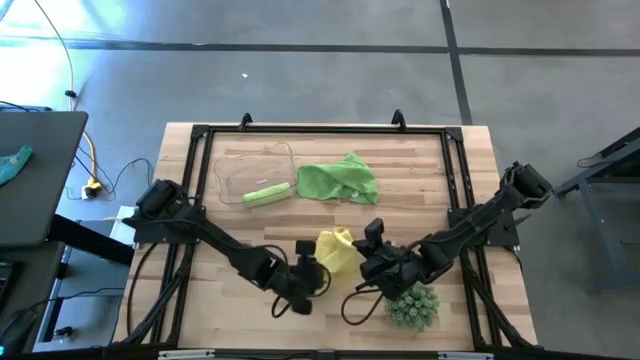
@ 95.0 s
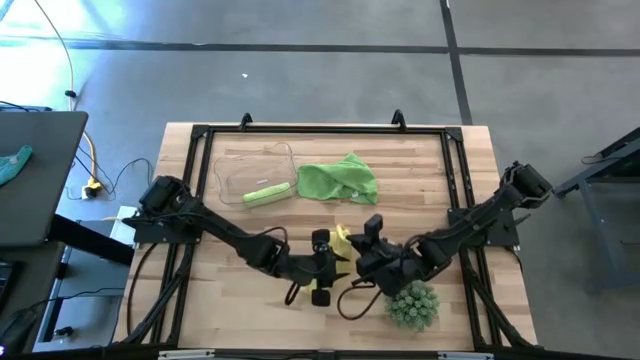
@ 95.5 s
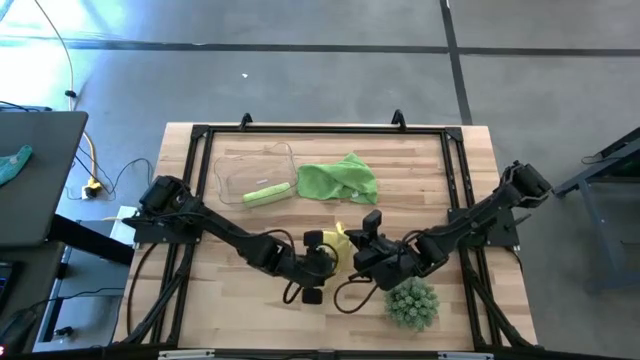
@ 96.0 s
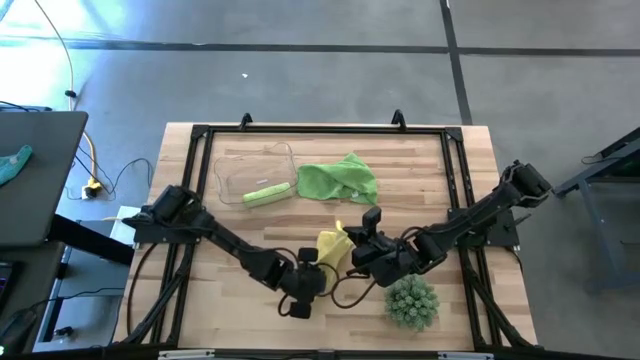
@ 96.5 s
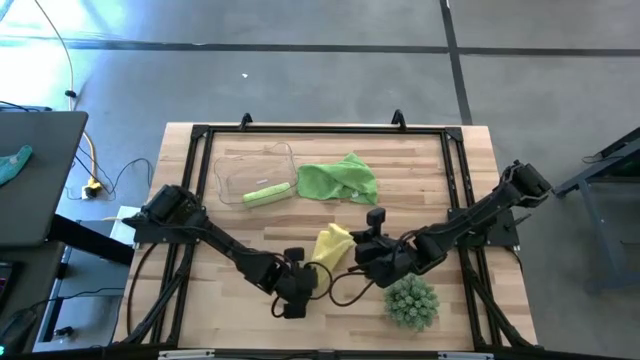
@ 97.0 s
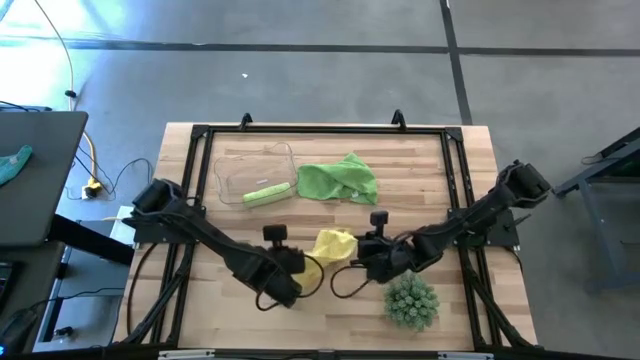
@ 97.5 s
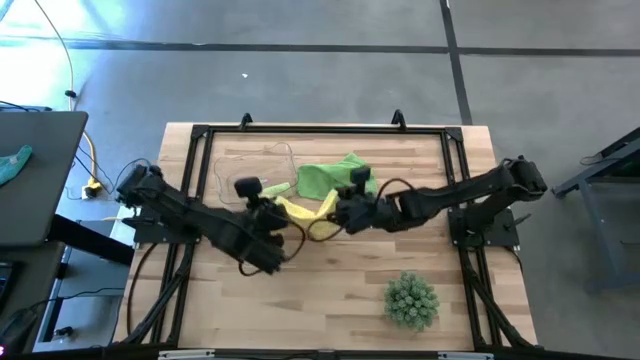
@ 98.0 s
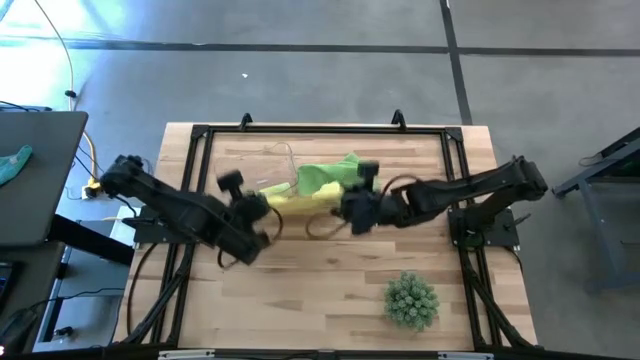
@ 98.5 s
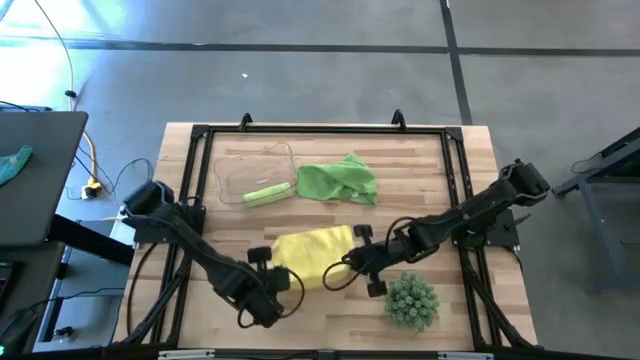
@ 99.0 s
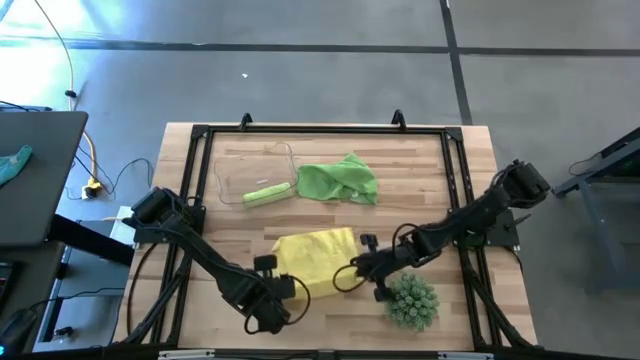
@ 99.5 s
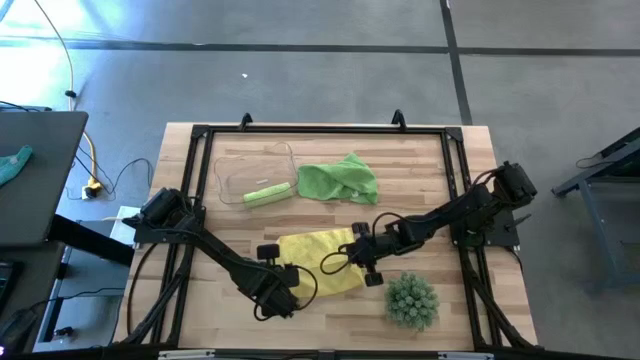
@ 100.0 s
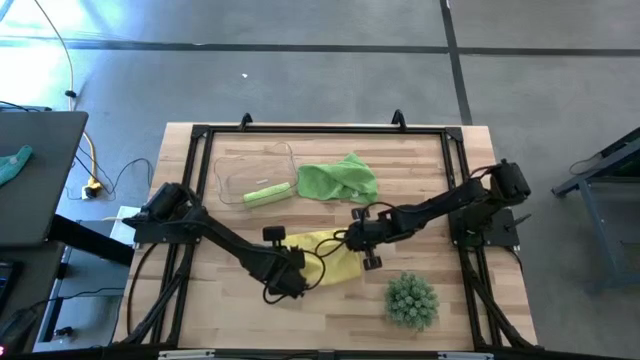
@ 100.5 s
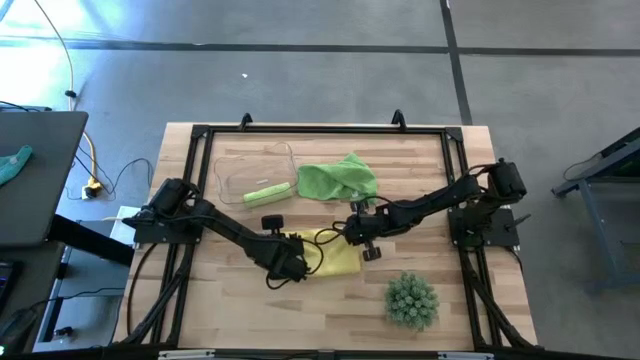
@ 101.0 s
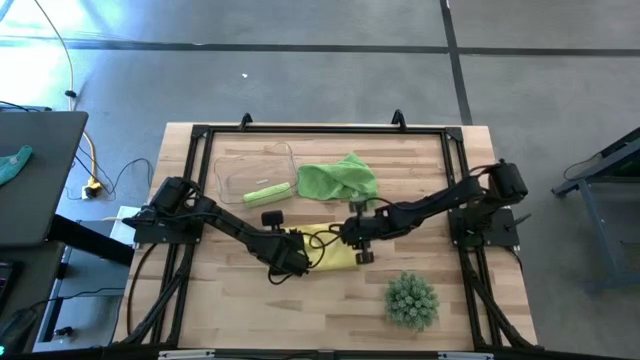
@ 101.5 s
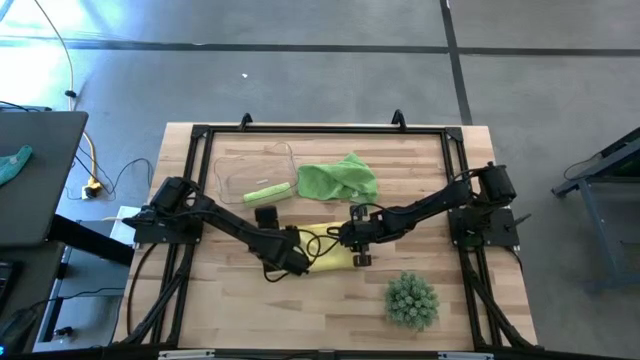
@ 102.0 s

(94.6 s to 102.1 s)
Task: Roll microfiber towels into tight, uniform cylinder then place into a basket
Fold the yellow towel

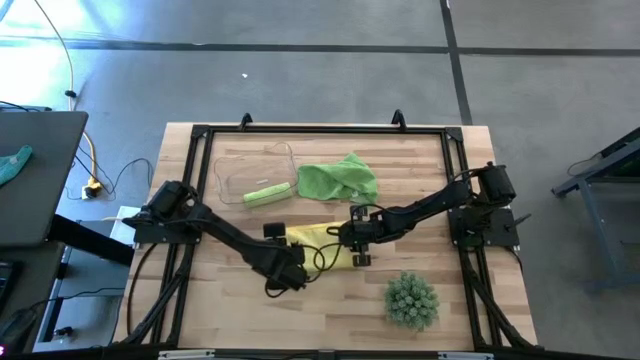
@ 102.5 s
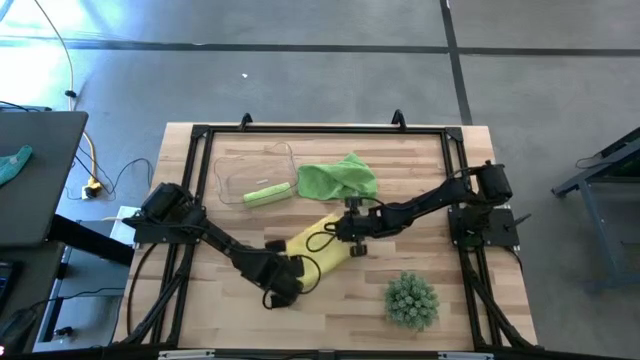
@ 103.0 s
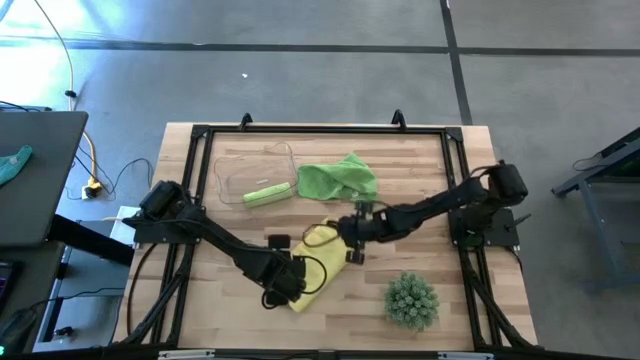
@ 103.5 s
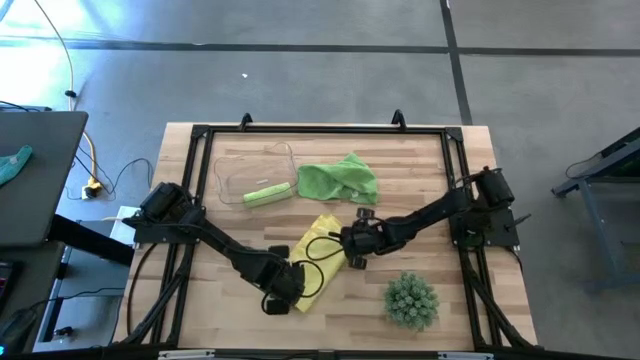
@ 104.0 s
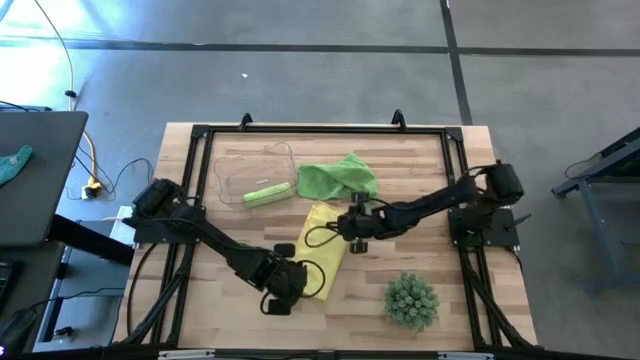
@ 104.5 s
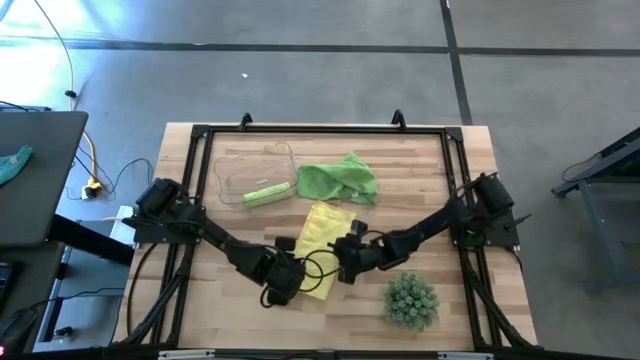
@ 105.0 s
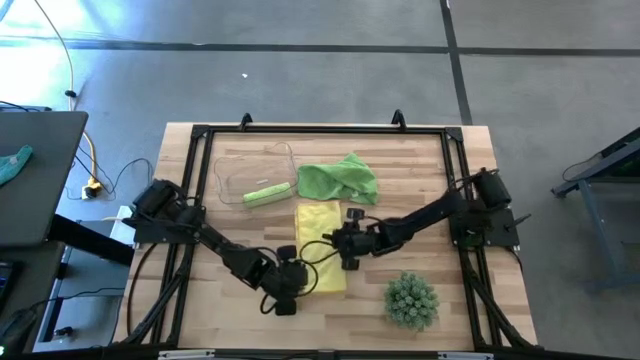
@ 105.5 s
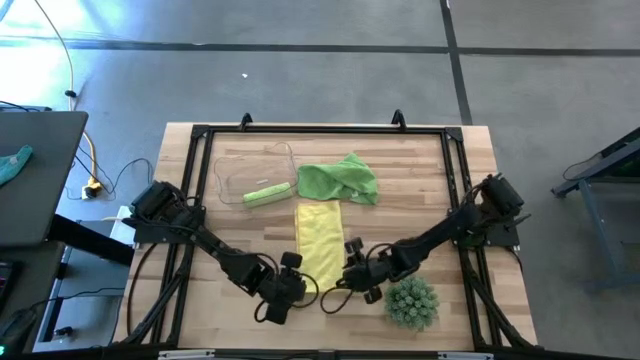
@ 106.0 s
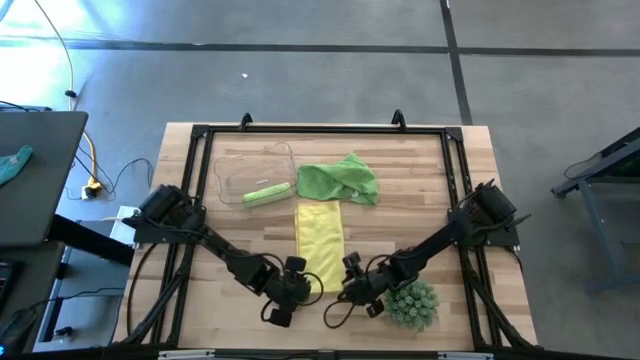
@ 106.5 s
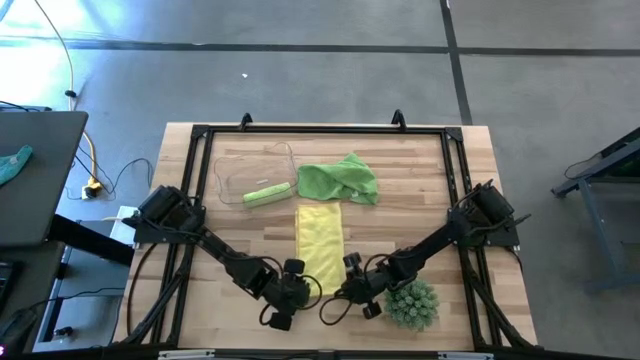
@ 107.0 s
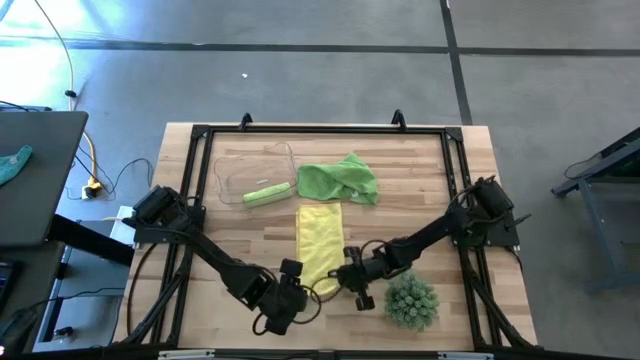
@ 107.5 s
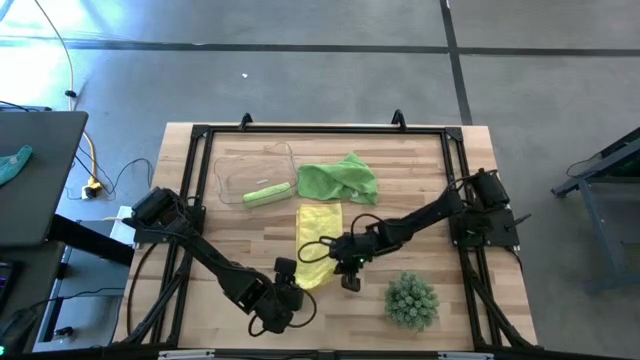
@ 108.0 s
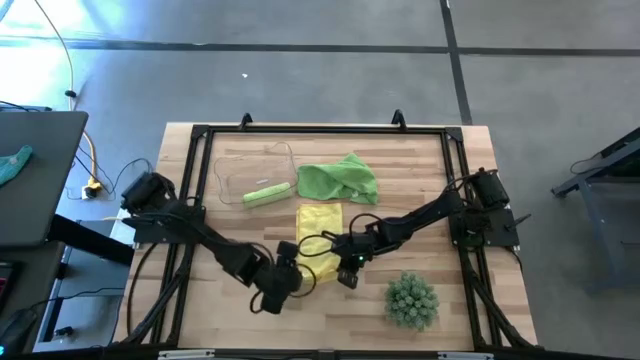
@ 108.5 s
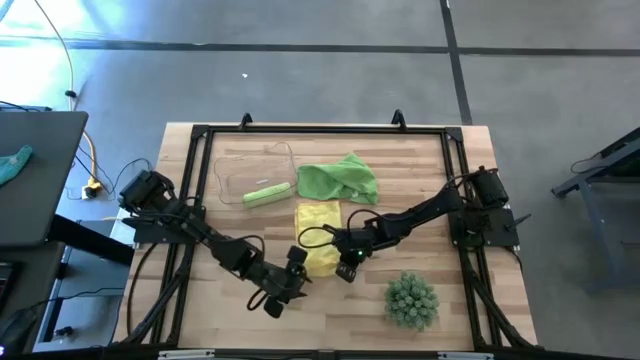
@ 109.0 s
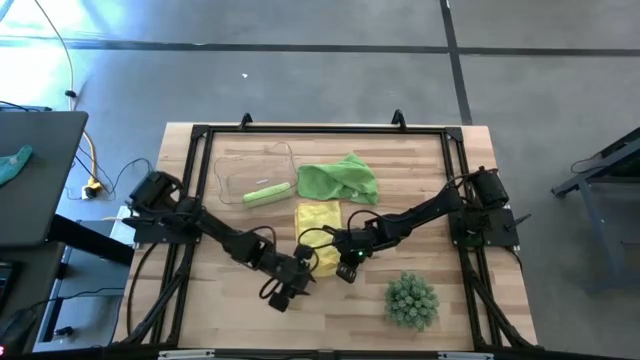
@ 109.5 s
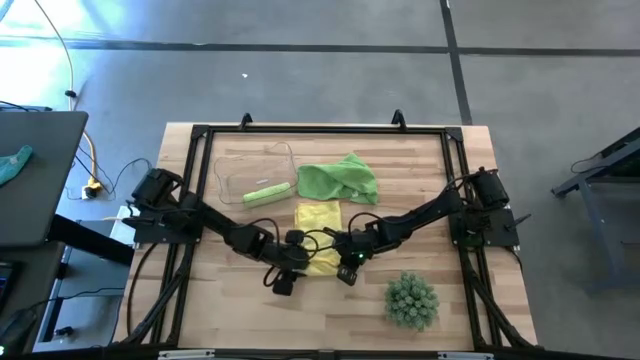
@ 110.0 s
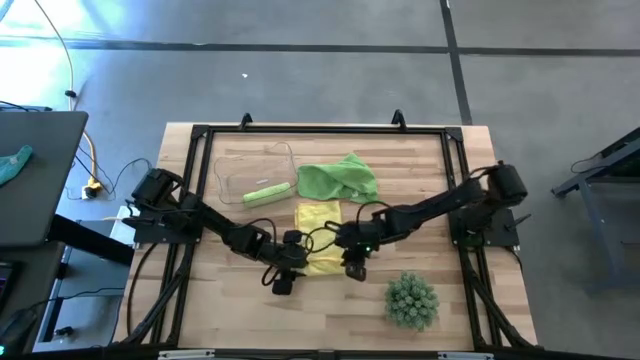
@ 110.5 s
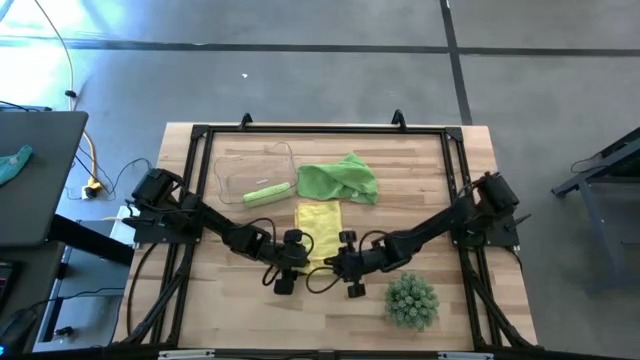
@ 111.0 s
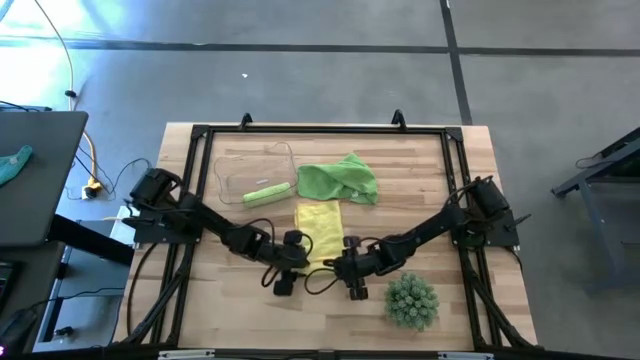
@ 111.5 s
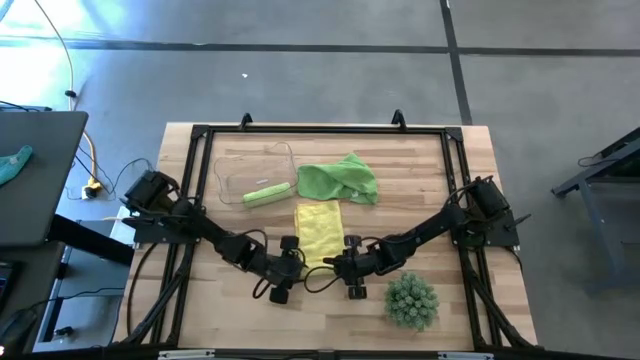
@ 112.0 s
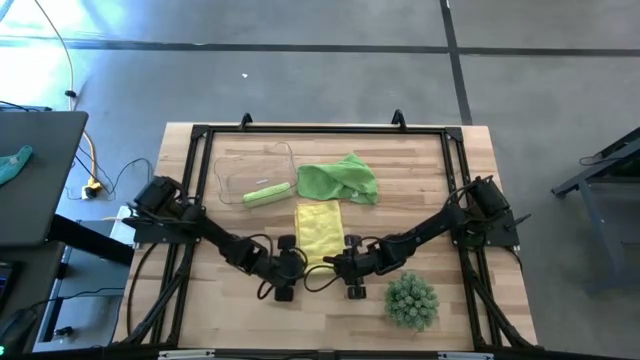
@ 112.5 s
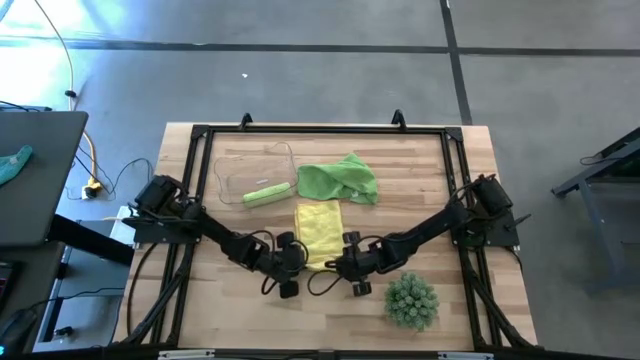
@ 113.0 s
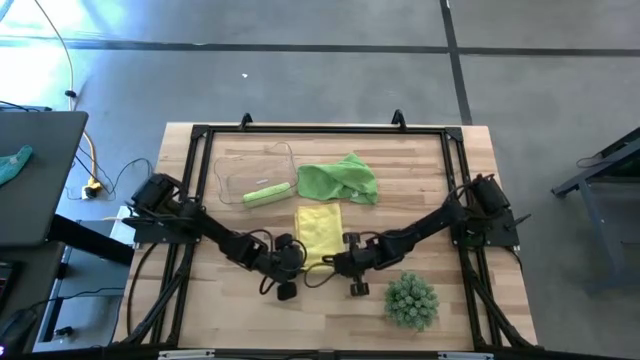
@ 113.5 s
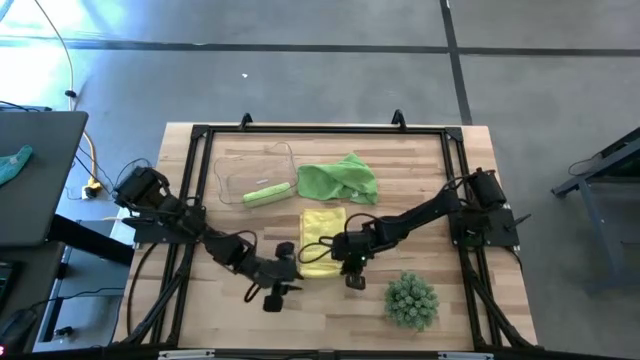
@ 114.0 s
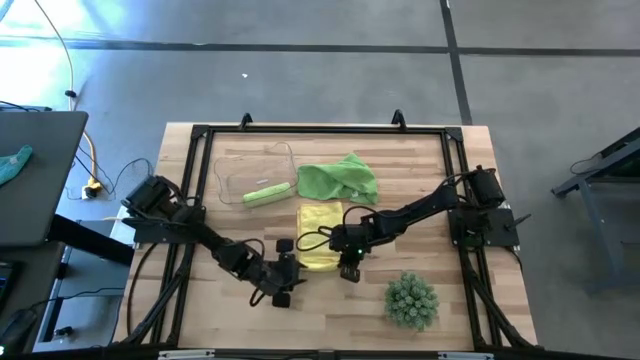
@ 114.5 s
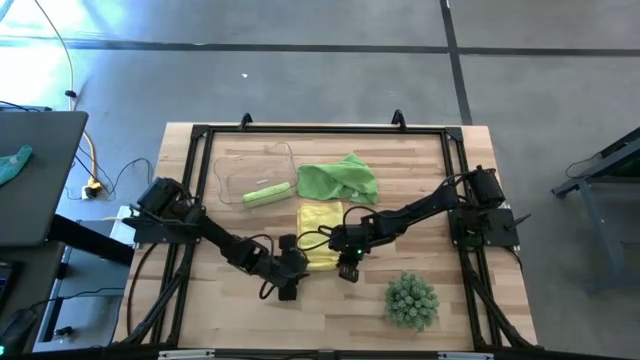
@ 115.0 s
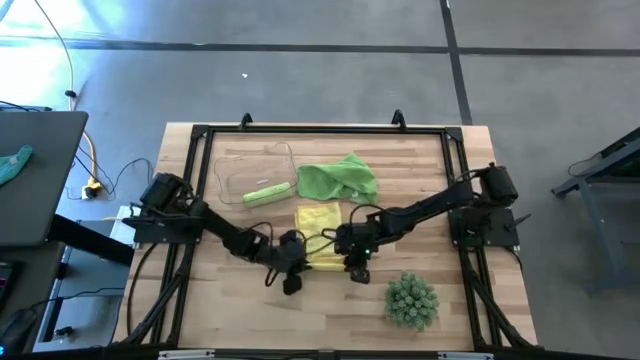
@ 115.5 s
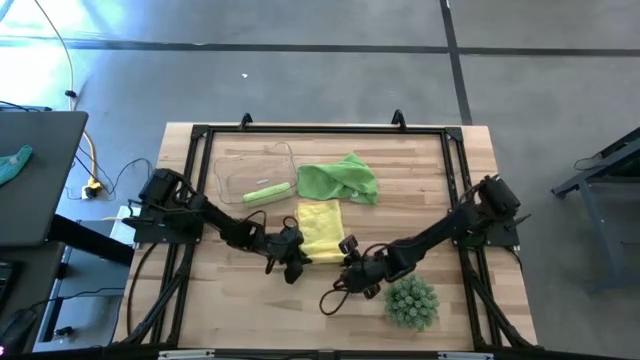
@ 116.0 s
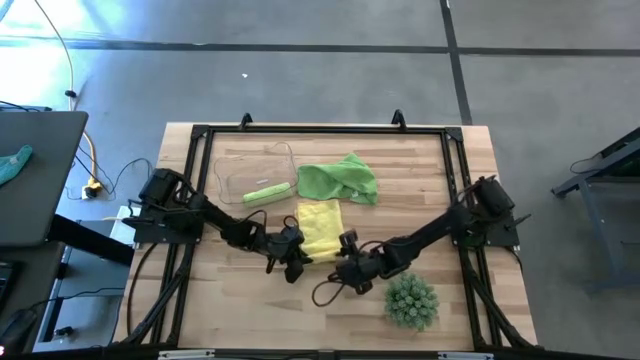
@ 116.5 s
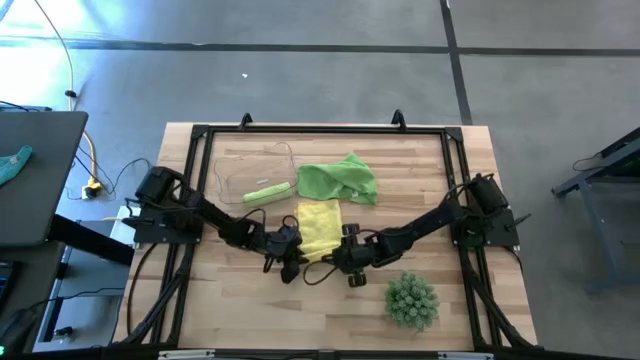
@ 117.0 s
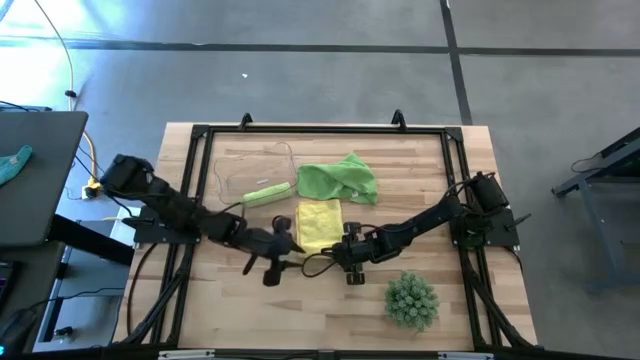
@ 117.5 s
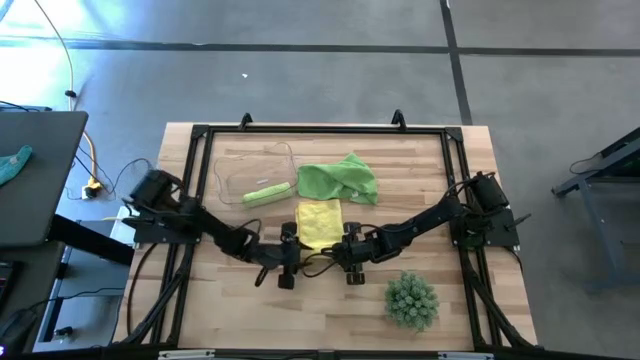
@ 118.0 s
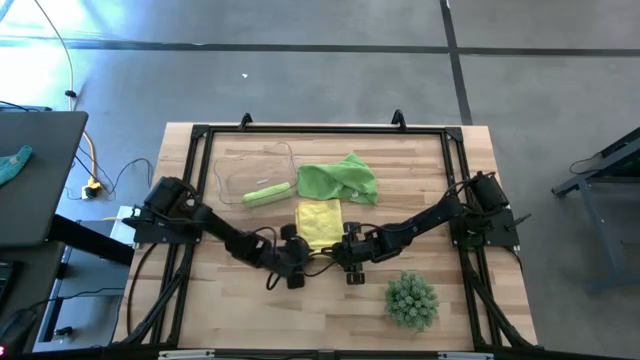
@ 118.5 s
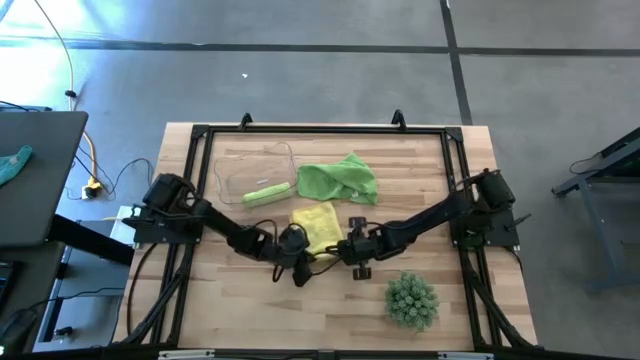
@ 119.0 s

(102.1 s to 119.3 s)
Roll the yellow towel
